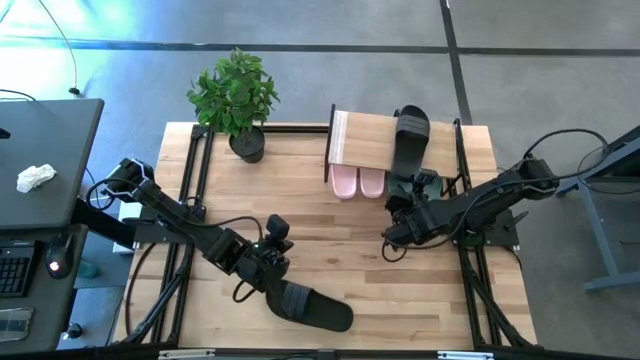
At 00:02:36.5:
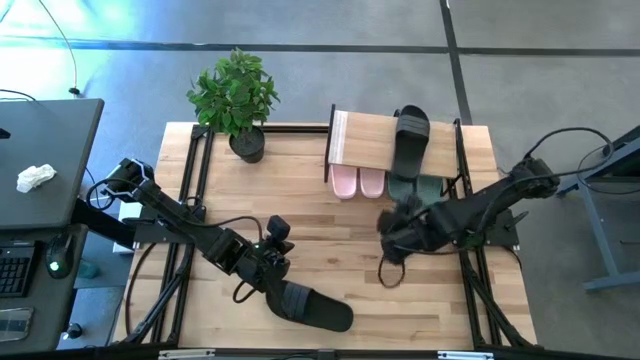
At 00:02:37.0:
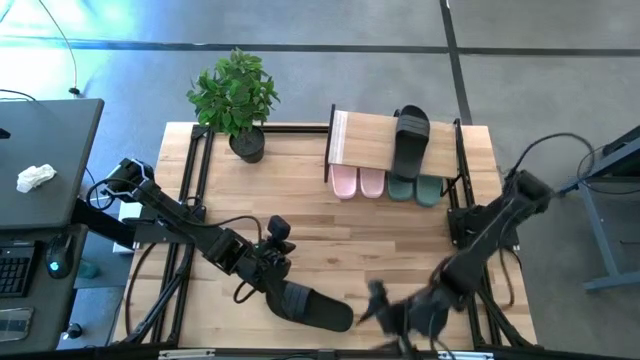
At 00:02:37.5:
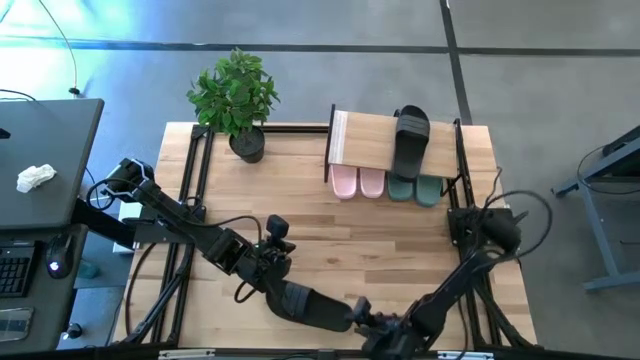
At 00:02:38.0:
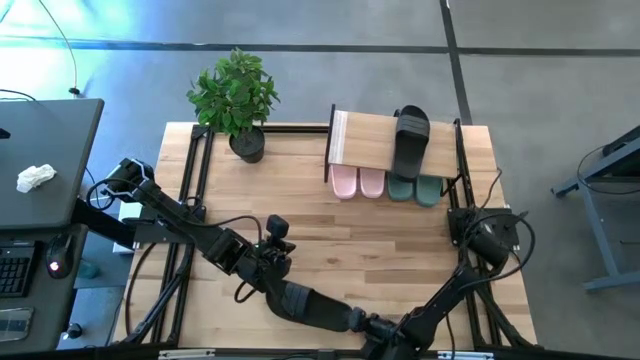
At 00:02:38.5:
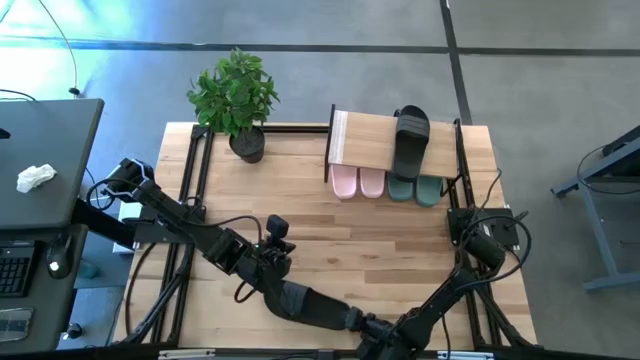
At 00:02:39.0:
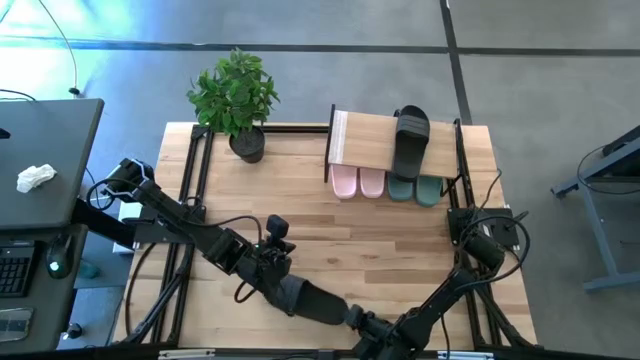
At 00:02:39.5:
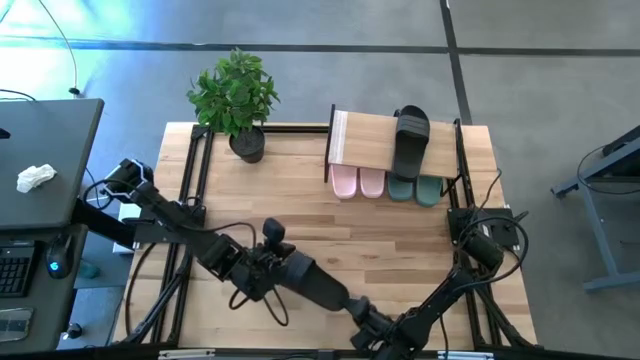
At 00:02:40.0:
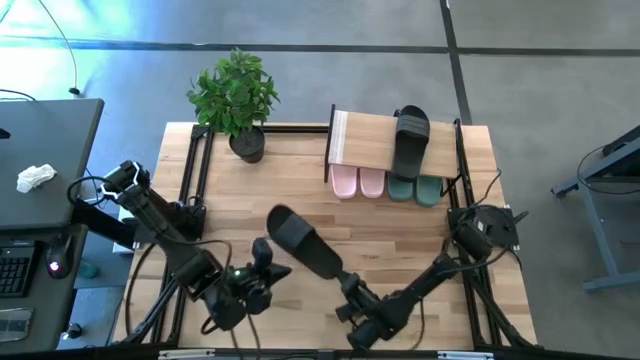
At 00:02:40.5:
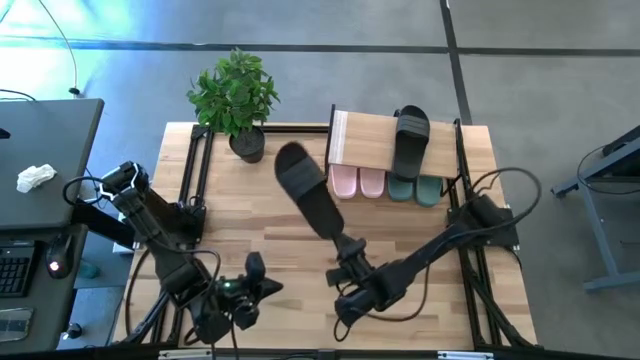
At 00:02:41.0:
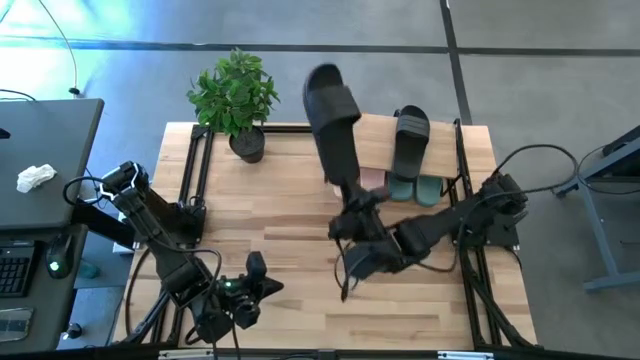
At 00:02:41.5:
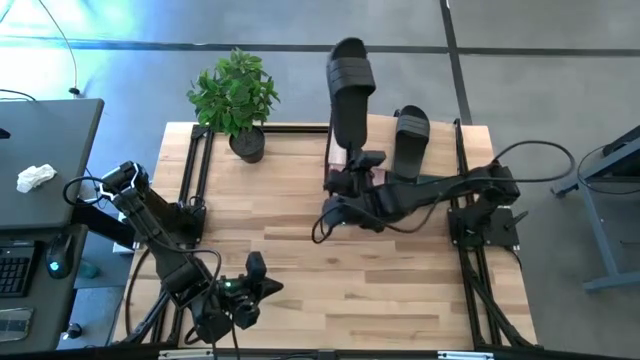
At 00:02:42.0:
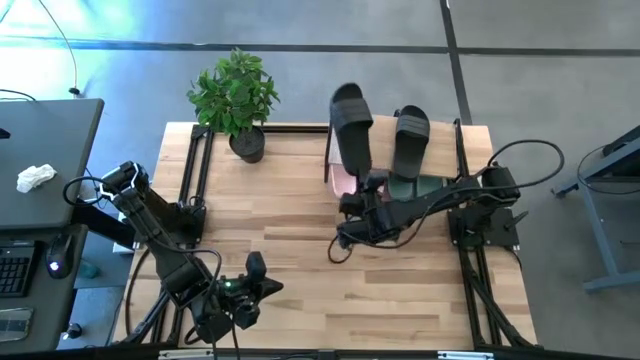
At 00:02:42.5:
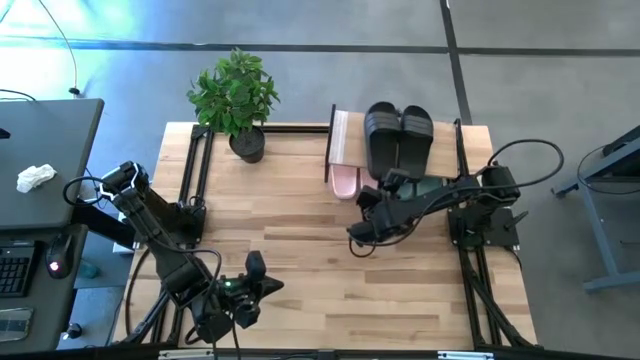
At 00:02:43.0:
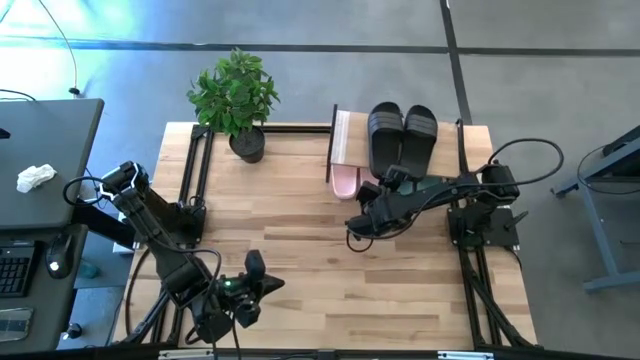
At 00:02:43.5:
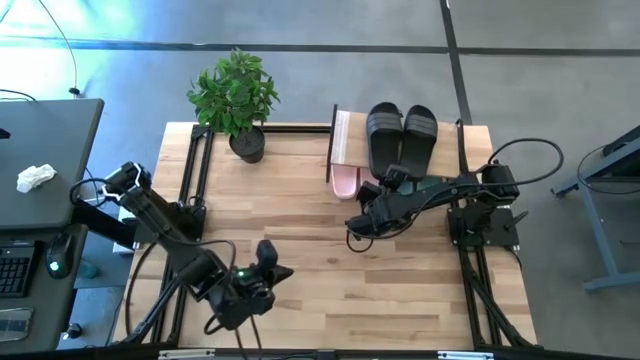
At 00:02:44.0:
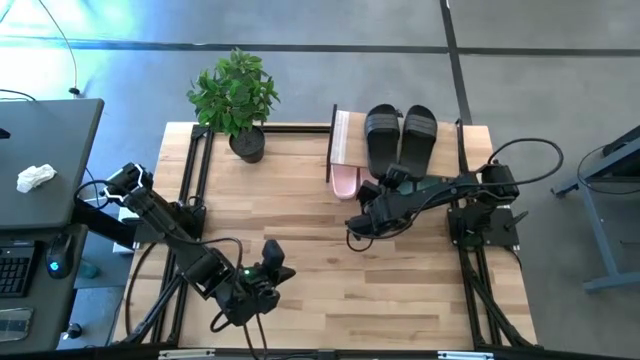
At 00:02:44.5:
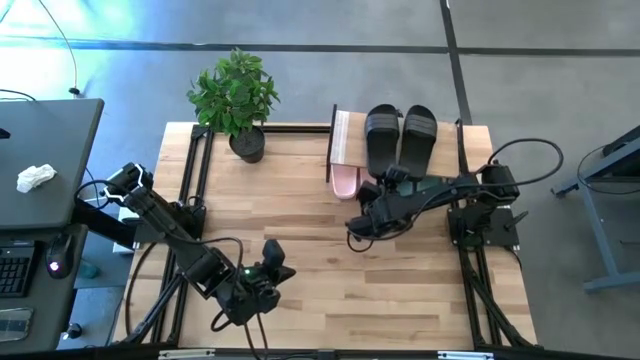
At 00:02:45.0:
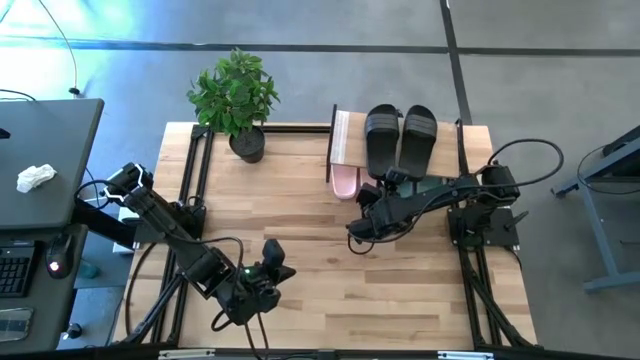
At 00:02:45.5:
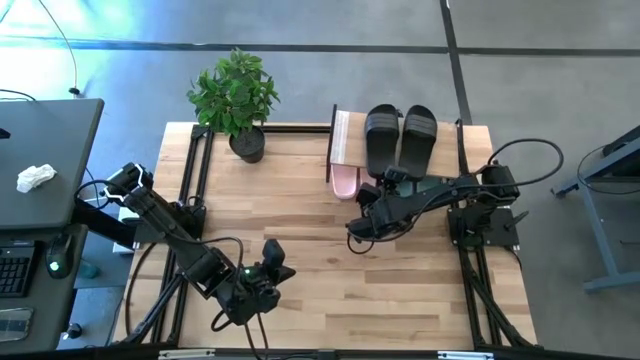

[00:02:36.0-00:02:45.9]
Task: Pick and place slides into the shelf
Put the black slide on the shelf

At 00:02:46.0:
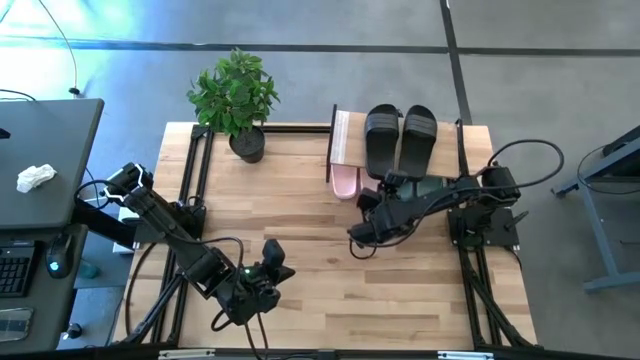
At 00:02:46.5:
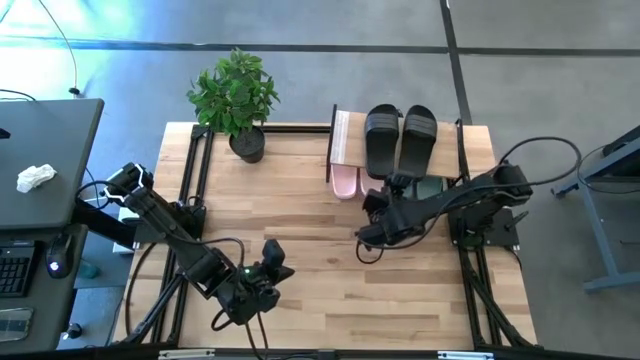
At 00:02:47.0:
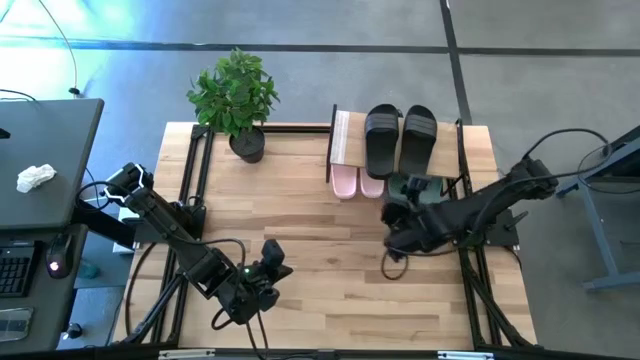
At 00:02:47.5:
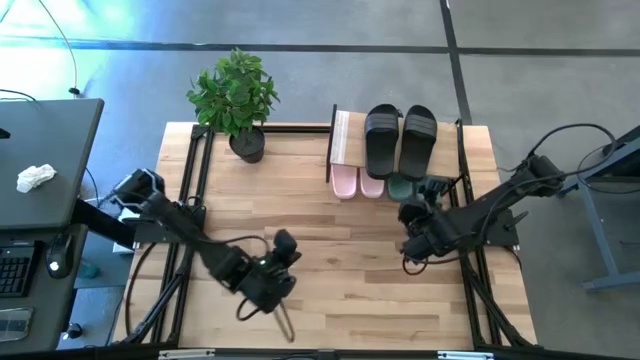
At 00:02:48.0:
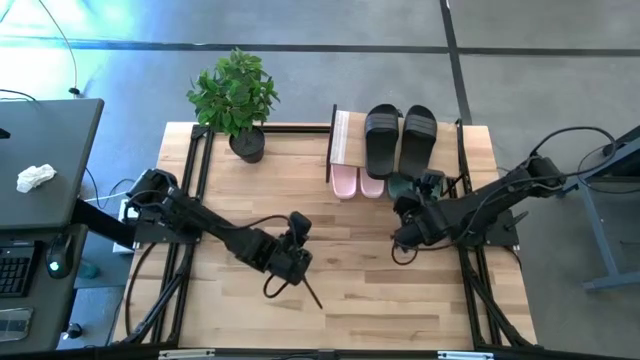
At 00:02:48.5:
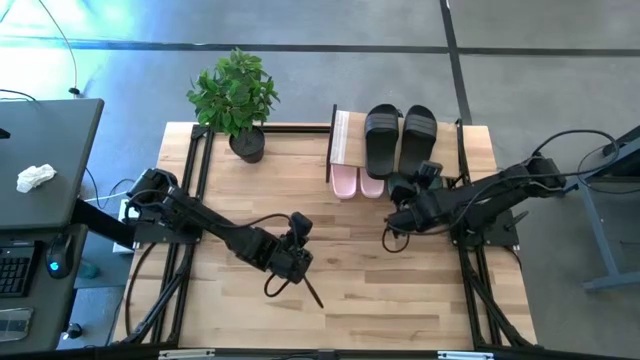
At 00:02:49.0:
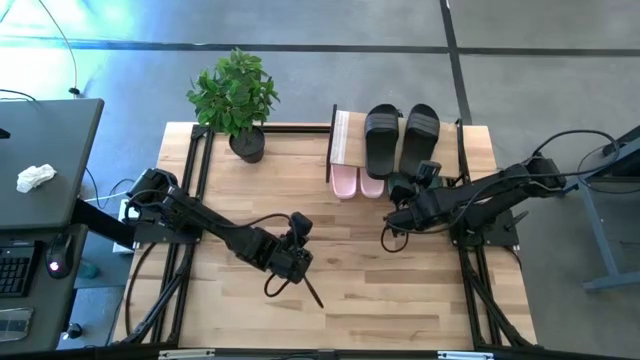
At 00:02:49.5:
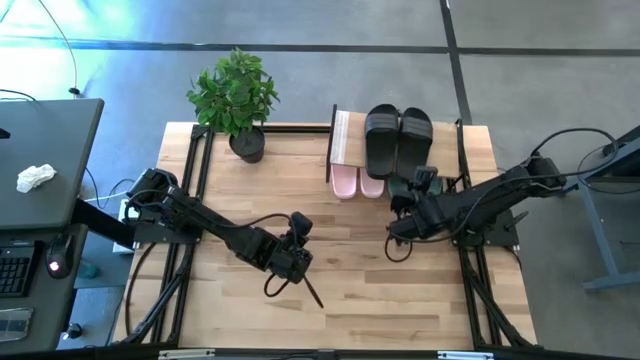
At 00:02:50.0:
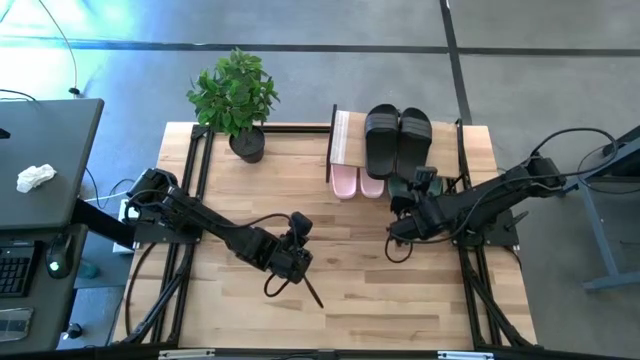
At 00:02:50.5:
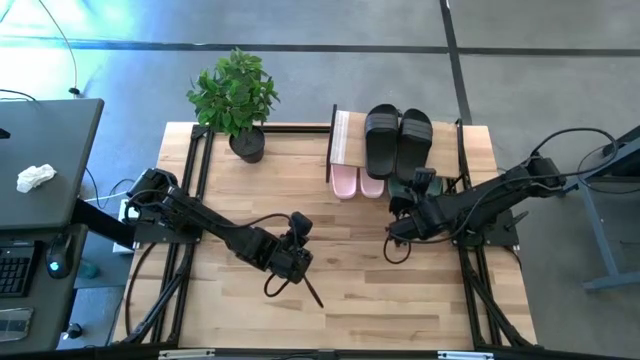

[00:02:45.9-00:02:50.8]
Adjust the right black slide on the shelf

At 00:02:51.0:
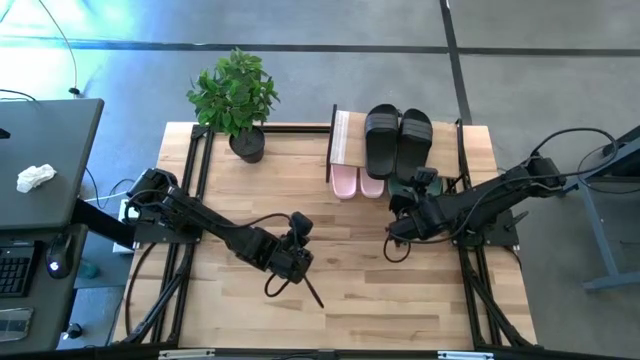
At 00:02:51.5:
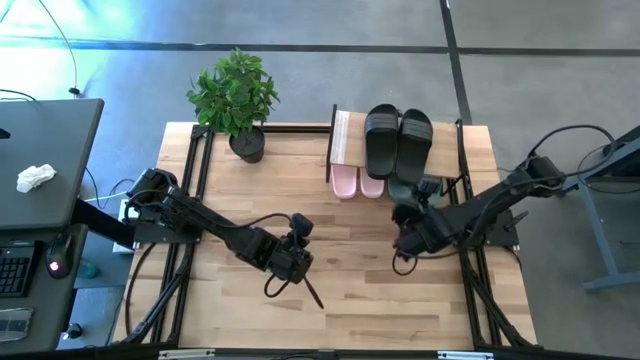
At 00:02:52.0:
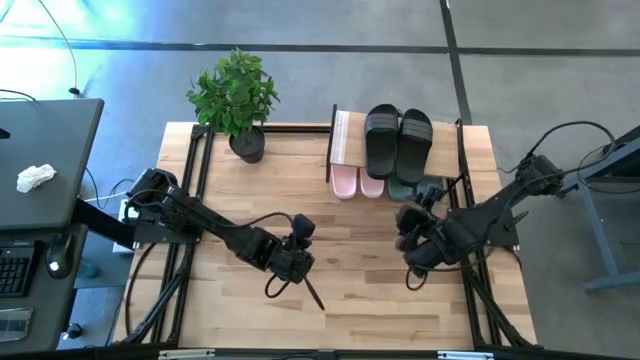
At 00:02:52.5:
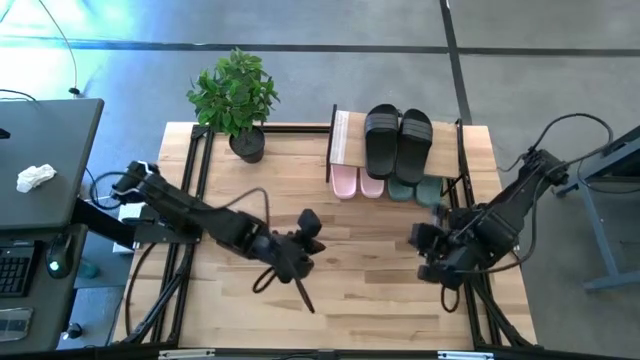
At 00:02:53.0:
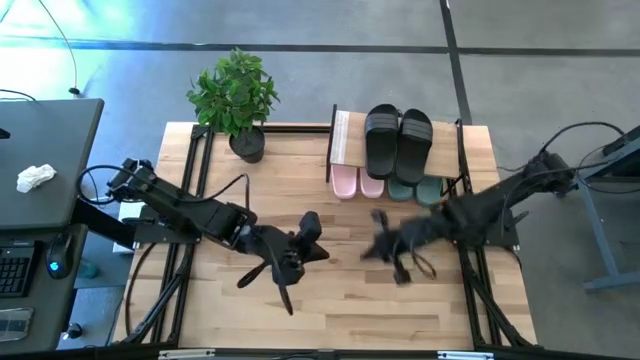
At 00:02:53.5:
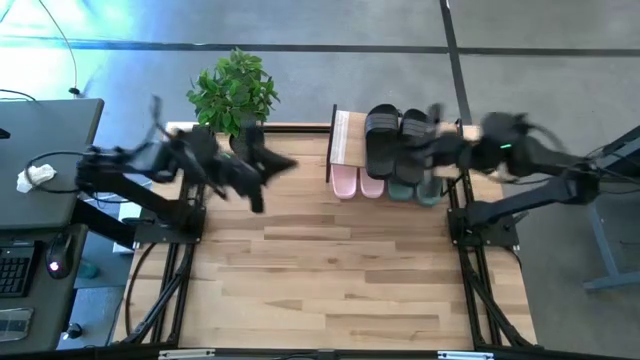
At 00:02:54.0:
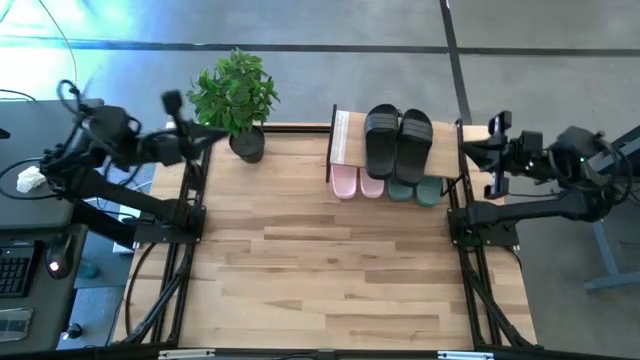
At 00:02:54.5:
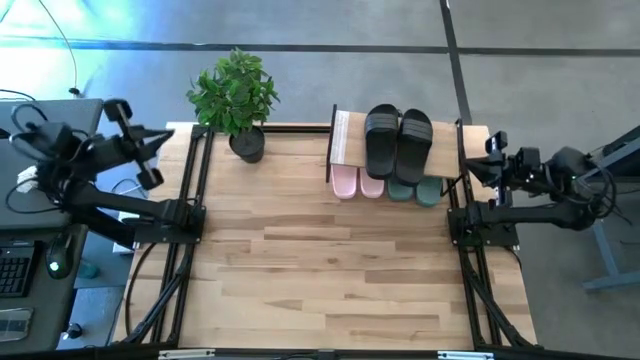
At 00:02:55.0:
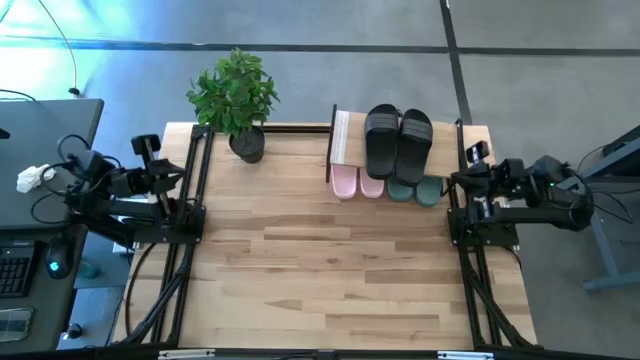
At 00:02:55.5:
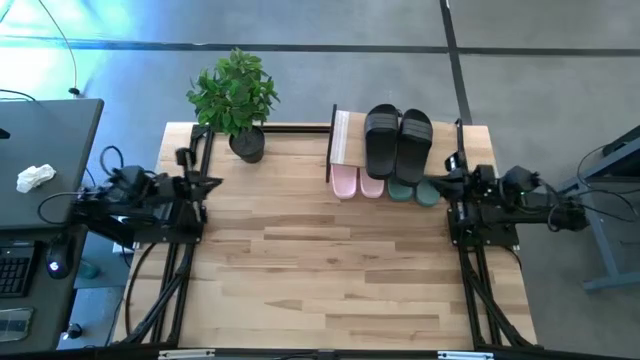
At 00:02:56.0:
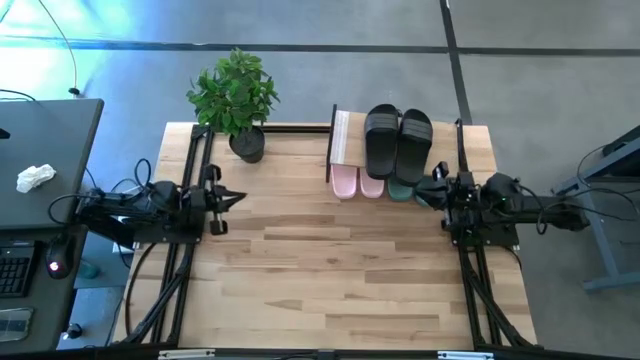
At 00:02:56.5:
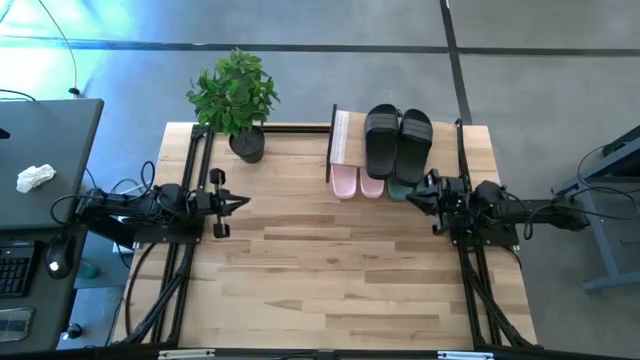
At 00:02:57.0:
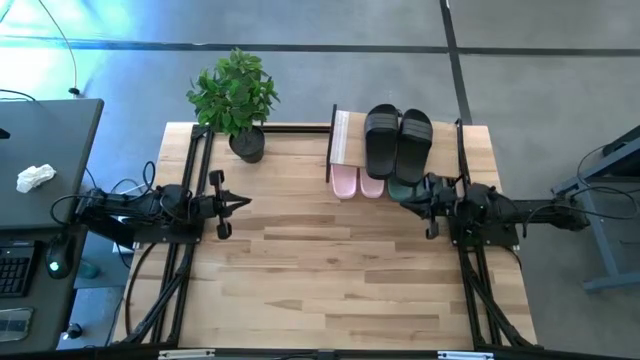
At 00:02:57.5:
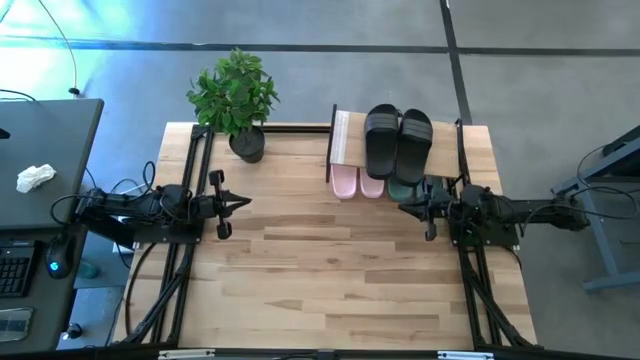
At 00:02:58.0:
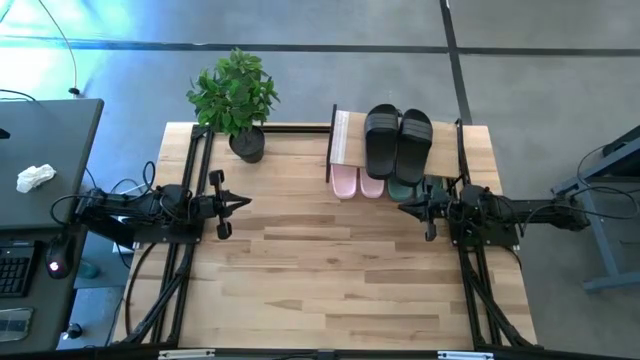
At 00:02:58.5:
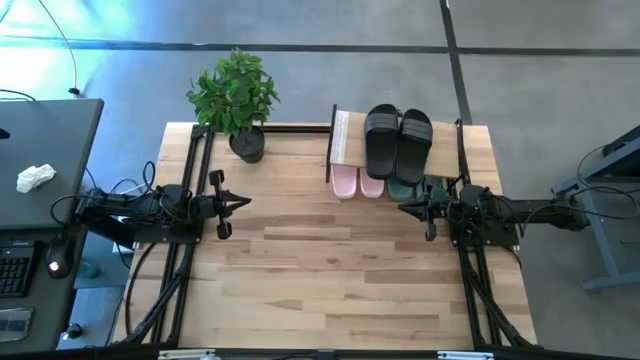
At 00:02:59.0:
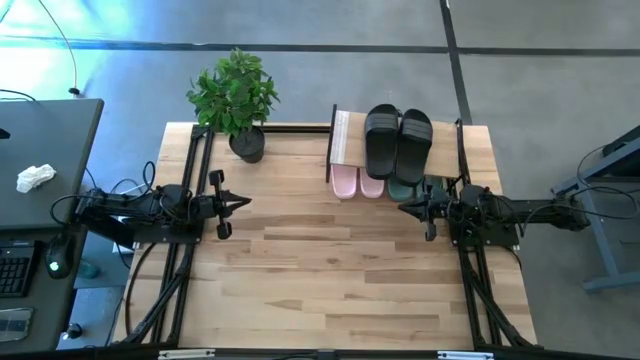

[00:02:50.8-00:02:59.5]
Return to Home Position
